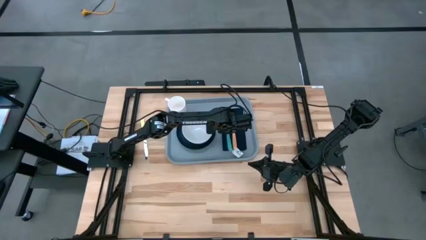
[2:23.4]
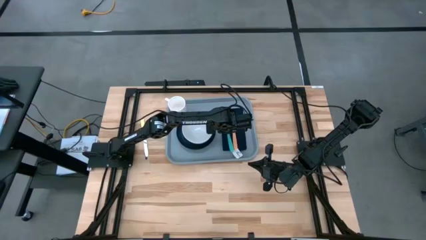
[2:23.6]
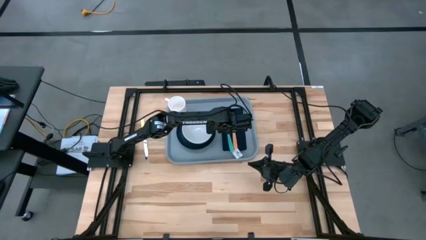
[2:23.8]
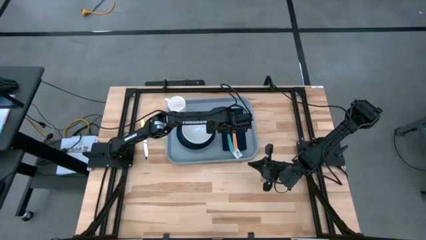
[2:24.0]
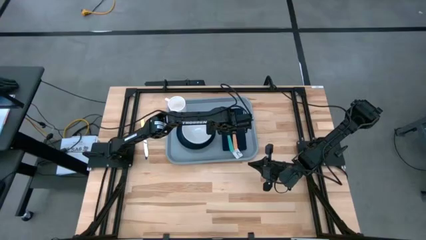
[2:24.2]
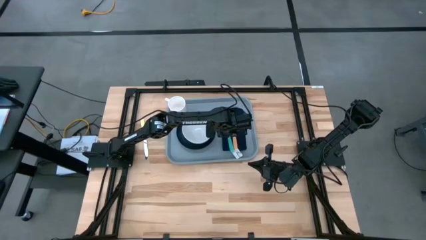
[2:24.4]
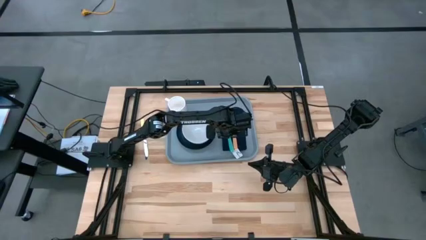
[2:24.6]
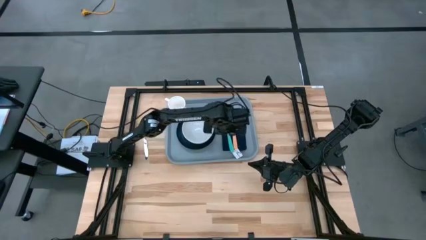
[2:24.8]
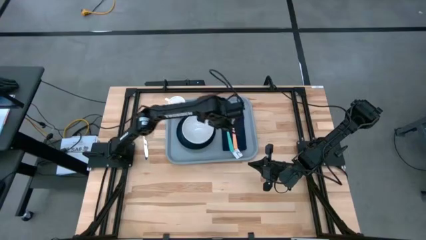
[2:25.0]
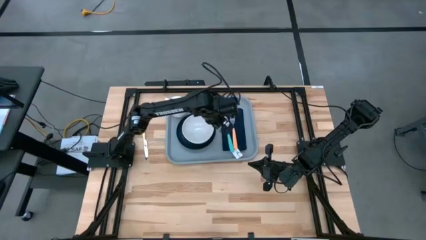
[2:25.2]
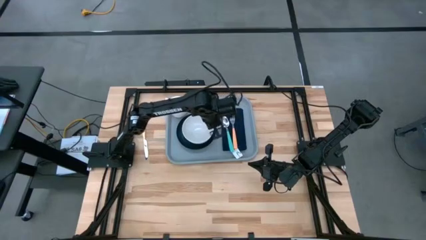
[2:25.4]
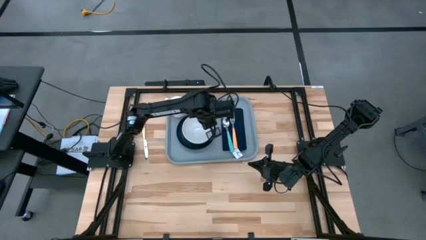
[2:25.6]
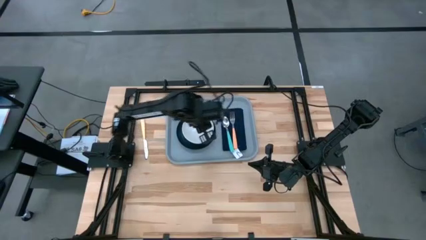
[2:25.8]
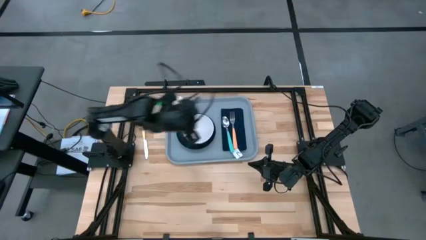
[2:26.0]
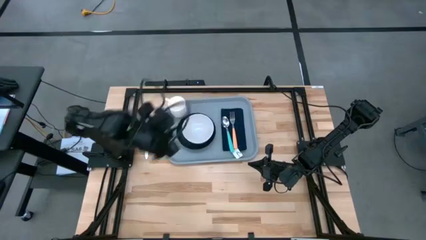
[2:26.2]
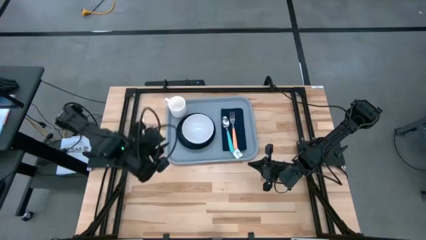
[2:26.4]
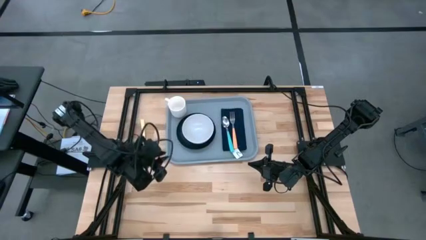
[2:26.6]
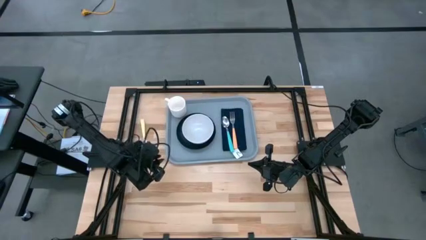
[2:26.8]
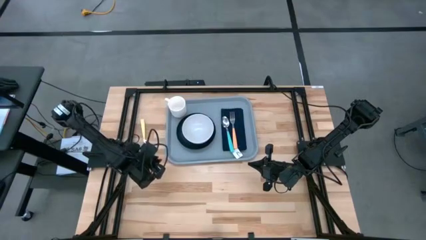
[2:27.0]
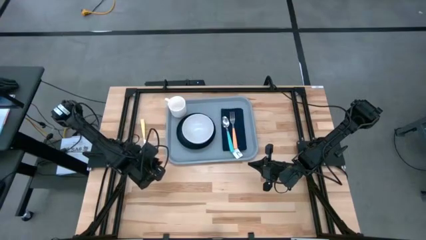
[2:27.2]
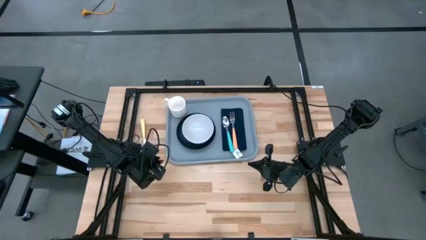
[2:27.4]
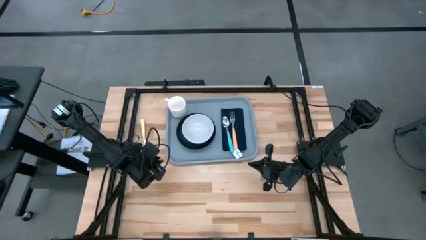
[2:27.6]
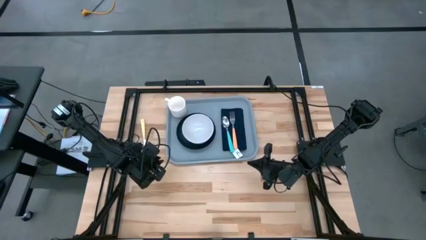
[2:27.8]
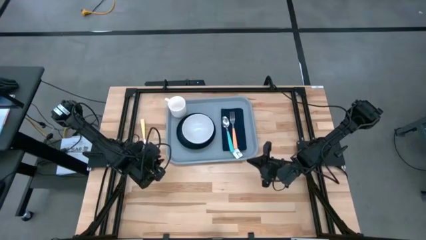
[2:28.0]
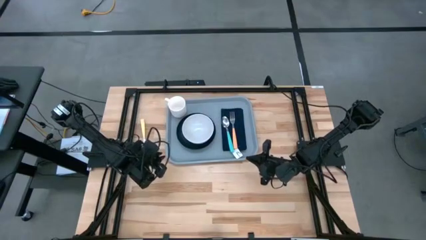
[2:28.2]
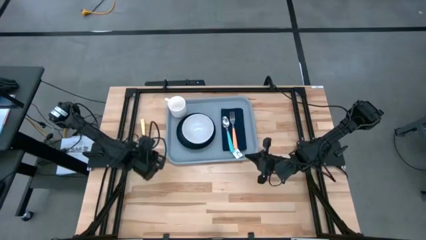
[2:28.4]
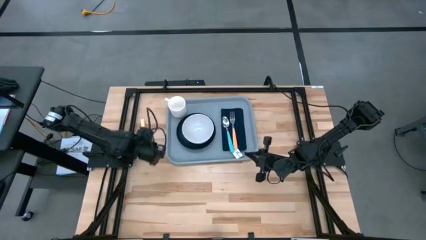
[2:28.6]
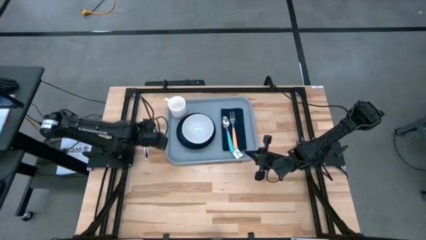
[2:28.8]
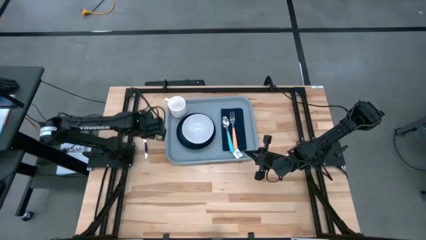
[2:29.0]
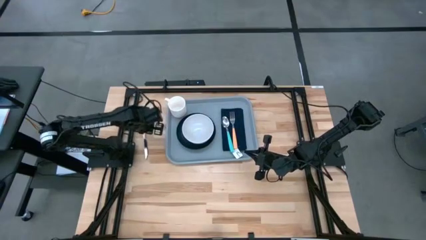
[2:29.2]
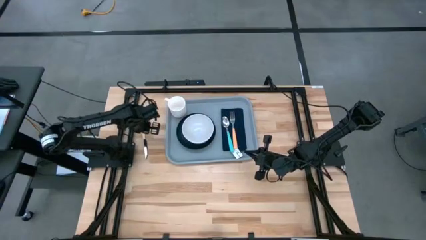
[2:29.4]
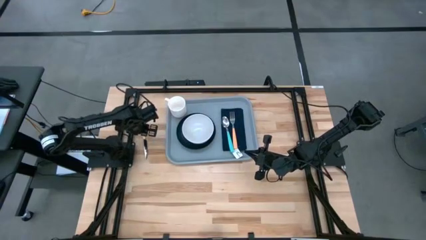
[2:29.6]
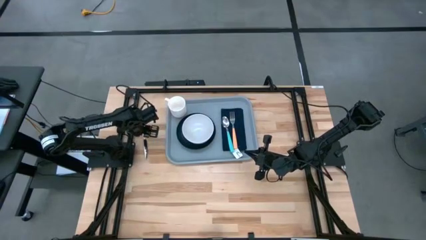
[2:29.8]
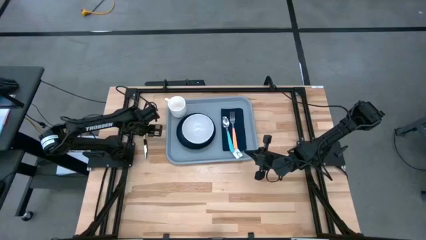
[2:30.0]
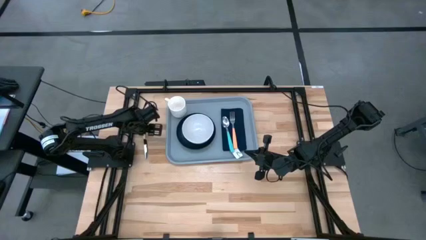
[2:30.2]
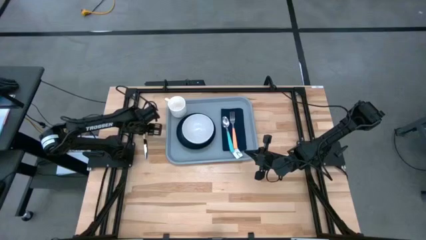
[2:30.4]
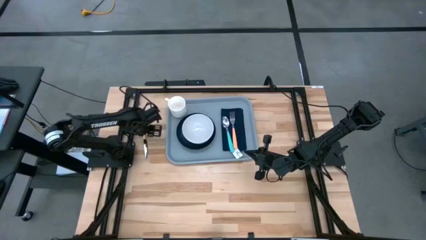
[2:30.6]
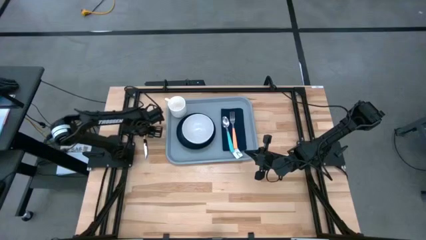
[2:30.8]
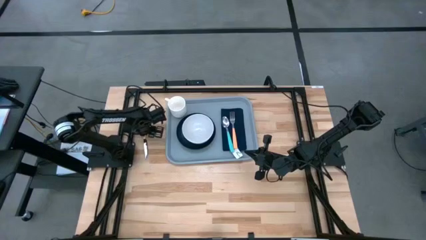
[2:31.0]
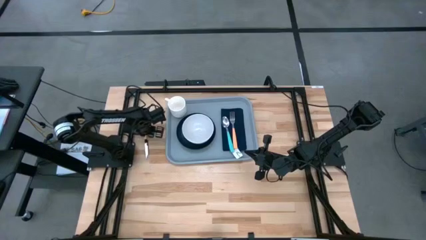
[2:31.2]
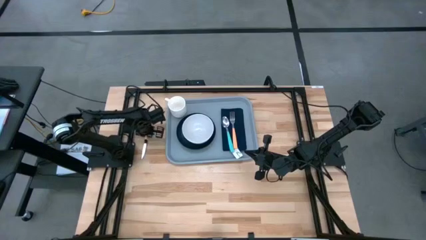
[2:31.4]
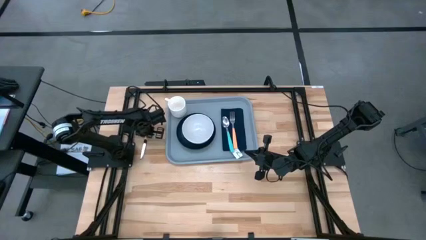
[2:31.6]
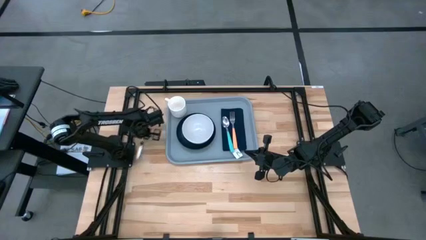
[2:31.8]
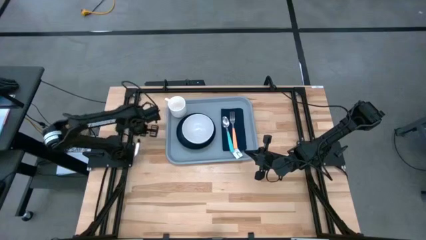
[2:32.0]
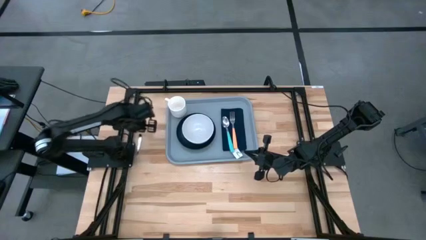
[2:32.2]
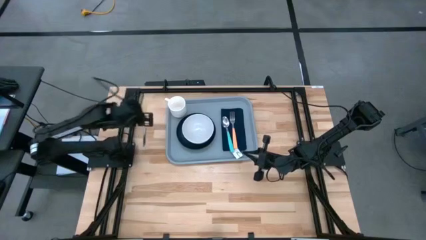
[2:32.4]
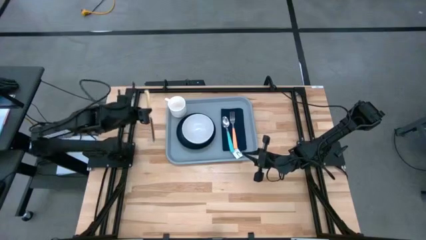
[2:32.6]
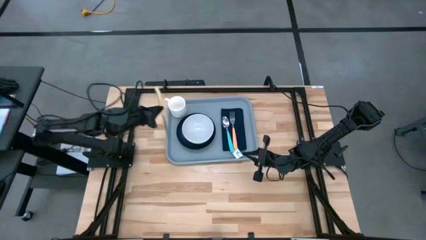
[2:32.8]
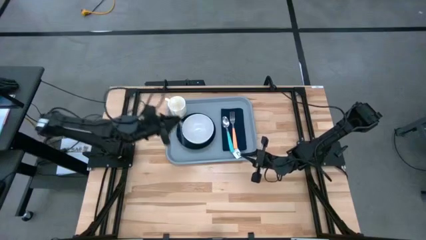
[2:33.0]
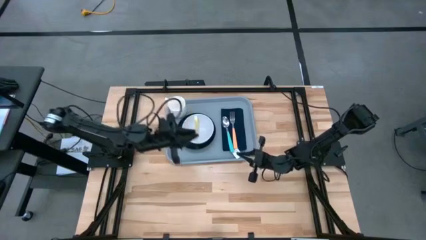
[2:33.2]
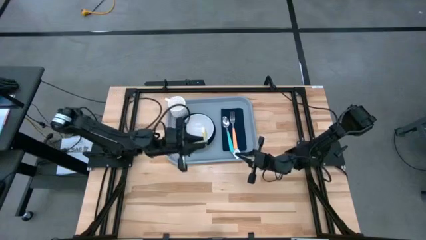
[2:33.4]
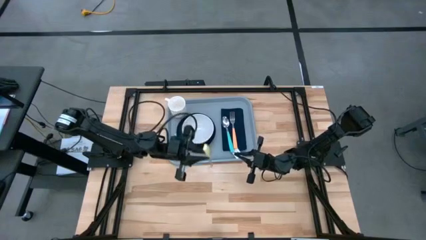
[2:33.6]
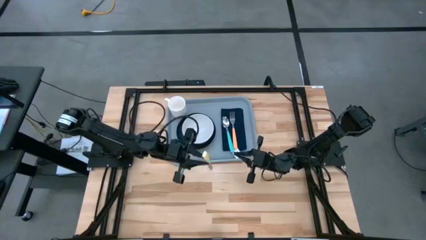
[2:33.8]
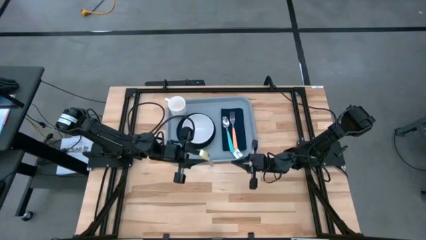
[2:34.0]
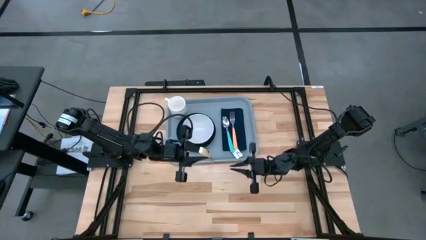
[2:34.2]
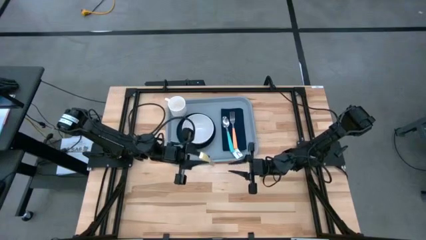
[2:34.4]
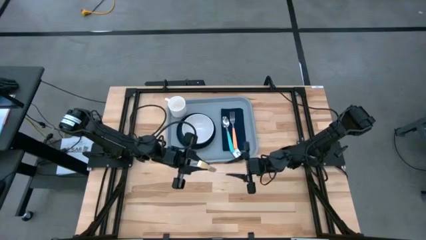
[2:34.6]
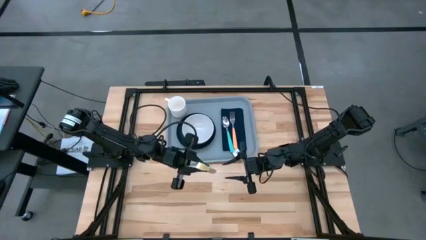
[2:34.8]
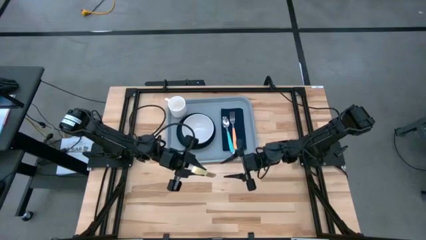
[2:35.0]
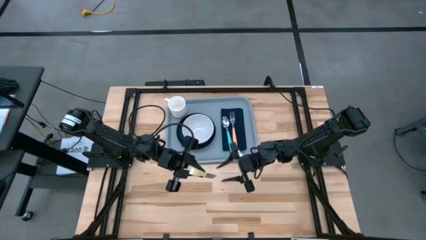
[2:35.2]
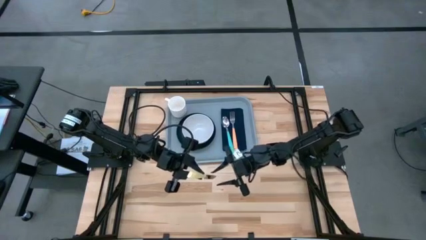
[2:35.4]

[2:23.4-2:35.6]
Task: Set up tray
Put the yellow knife on the black napkin to the right of the orange fork
